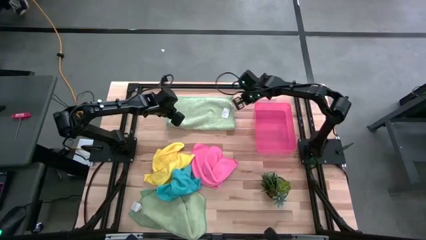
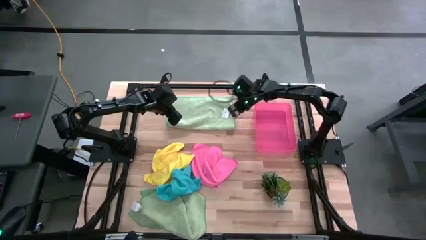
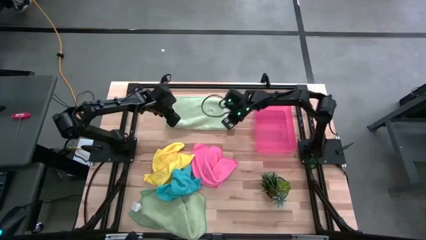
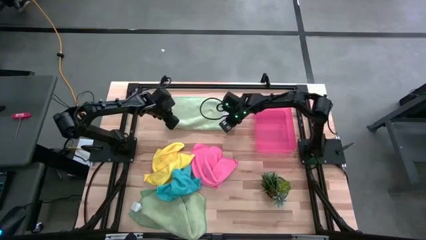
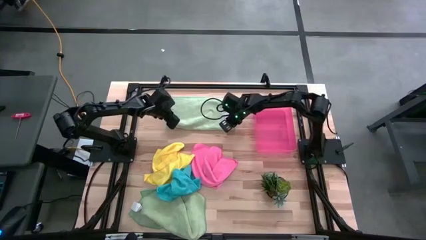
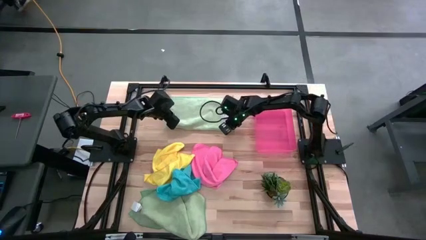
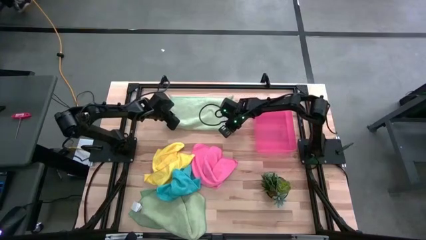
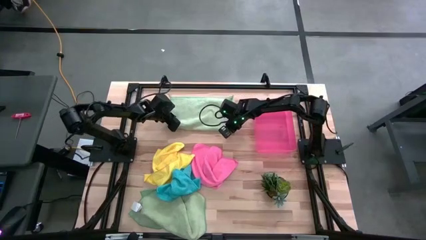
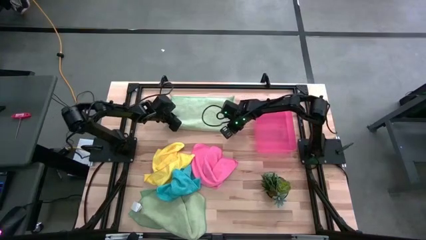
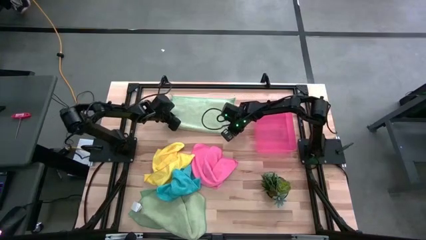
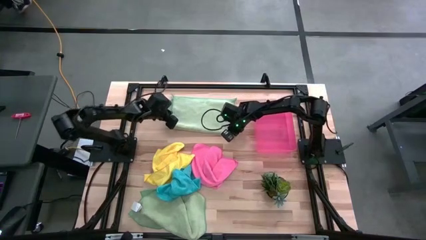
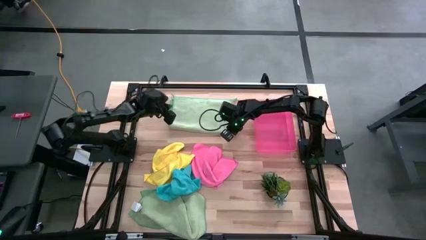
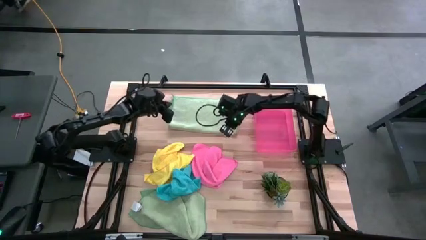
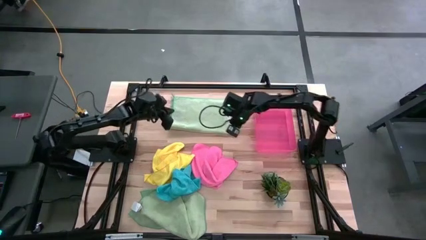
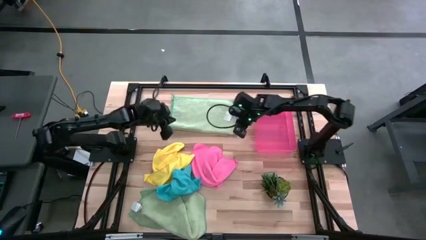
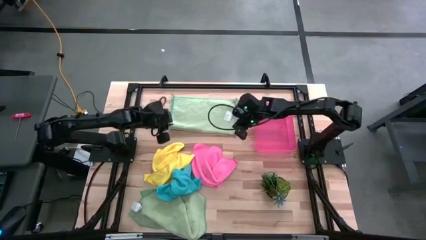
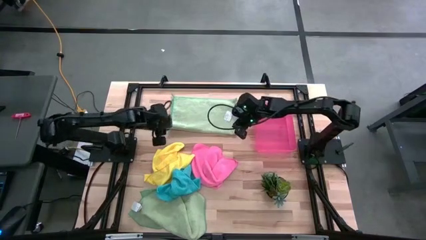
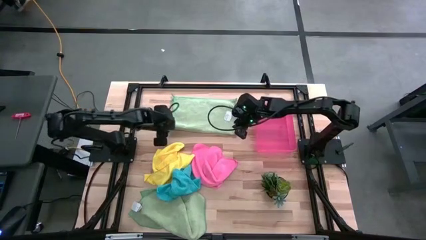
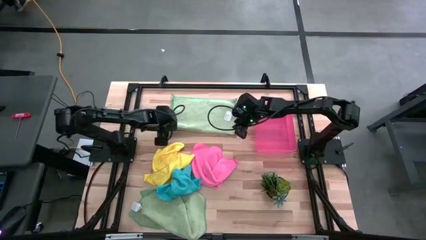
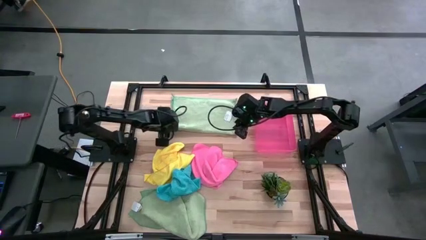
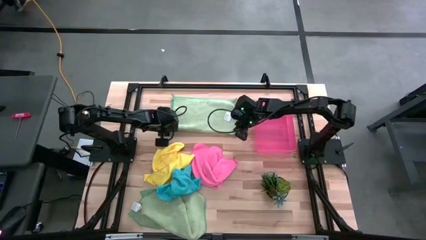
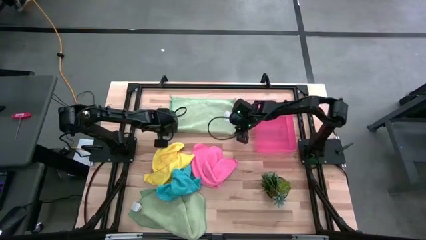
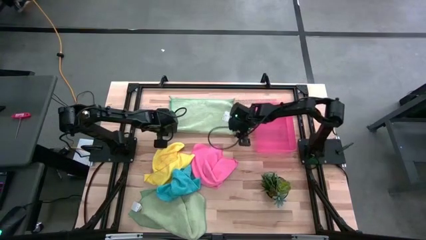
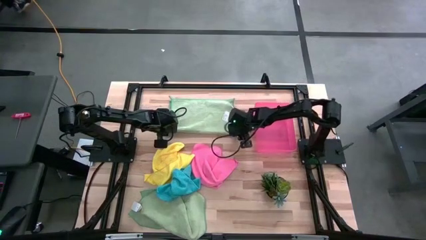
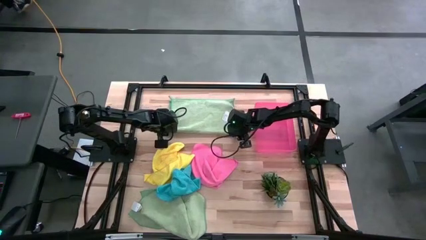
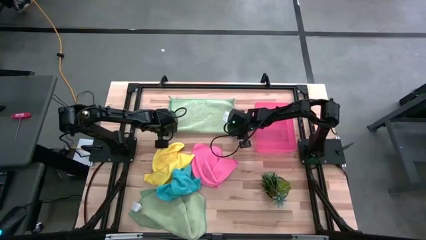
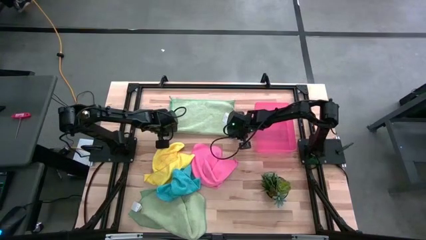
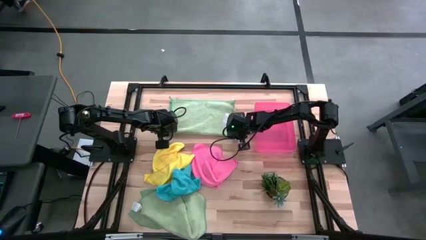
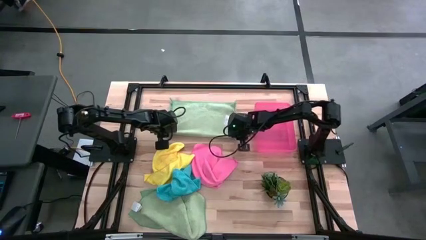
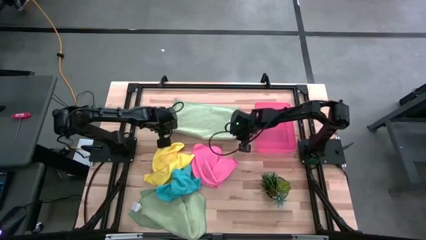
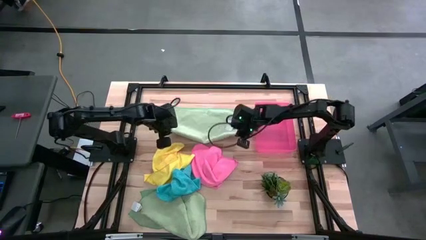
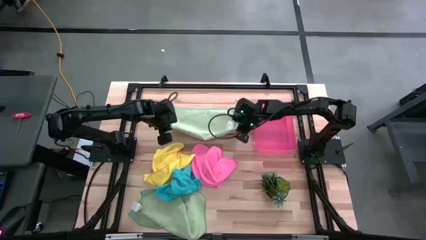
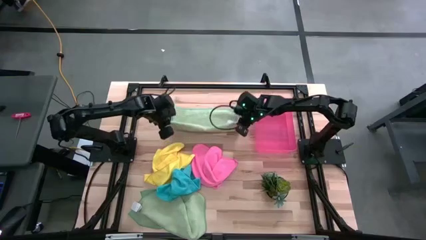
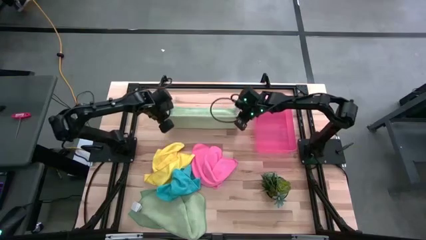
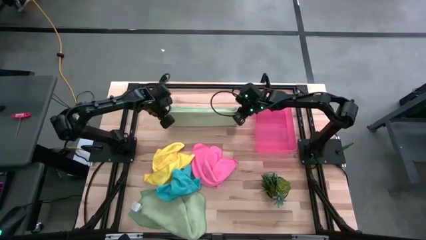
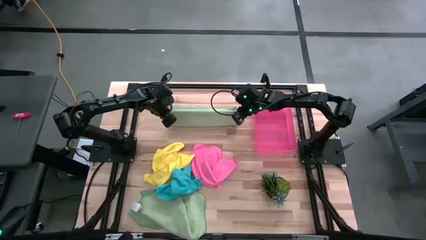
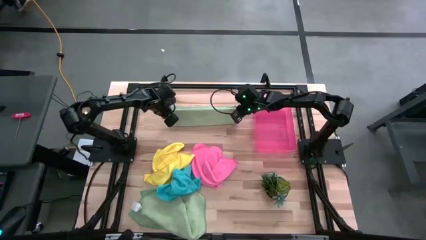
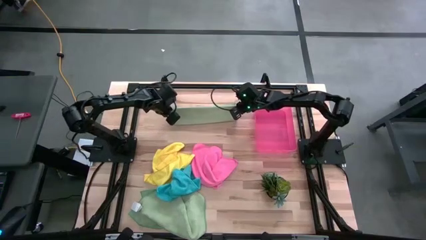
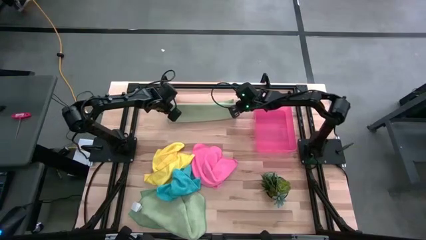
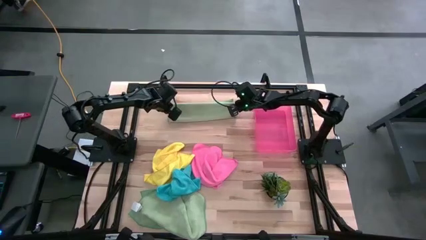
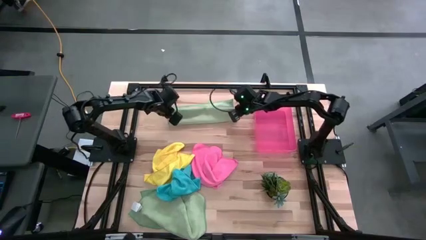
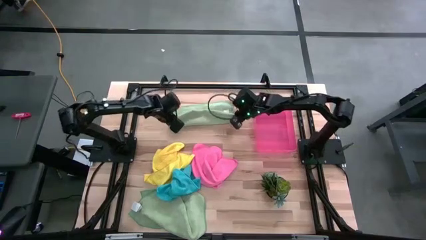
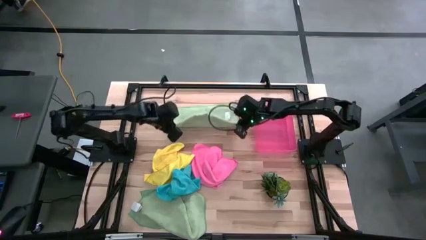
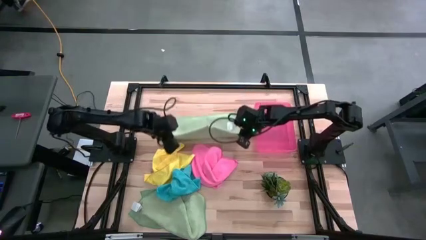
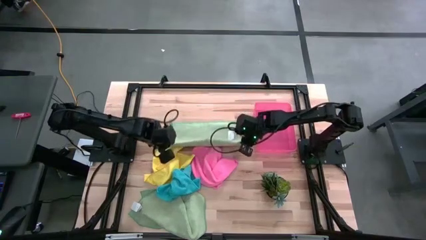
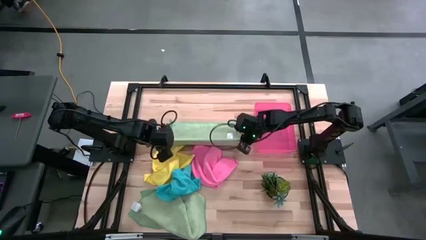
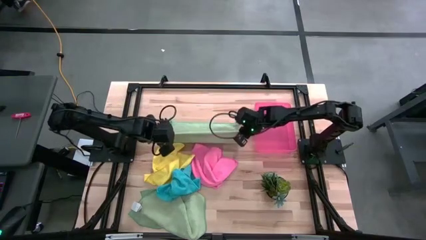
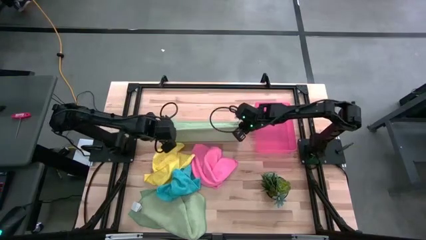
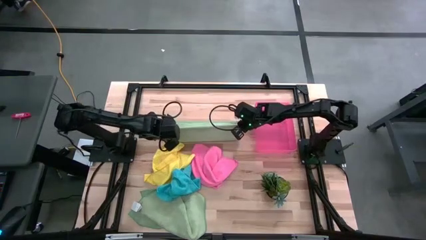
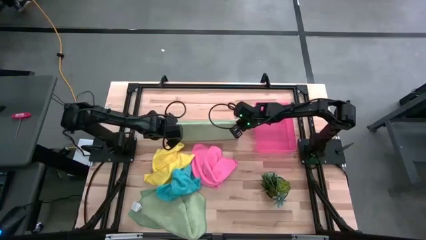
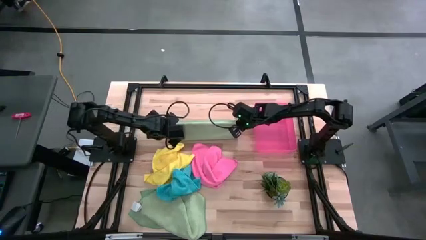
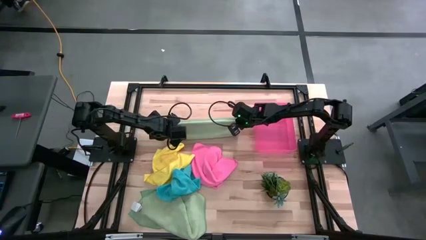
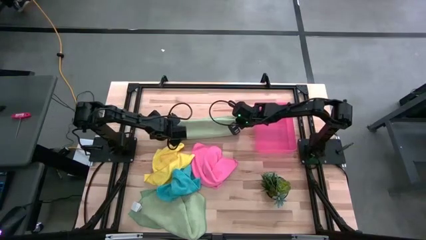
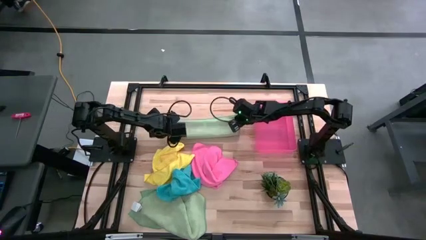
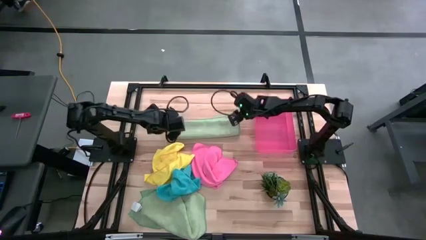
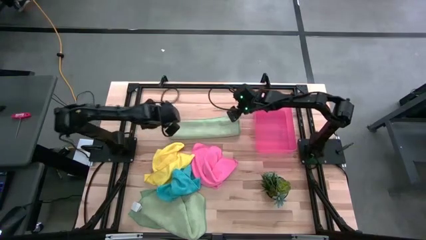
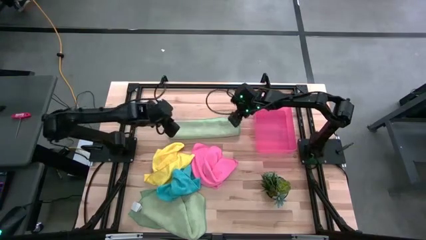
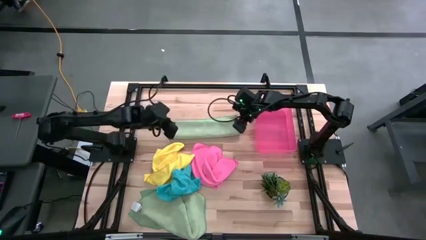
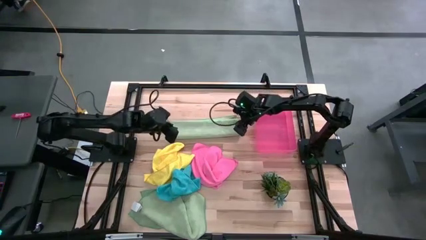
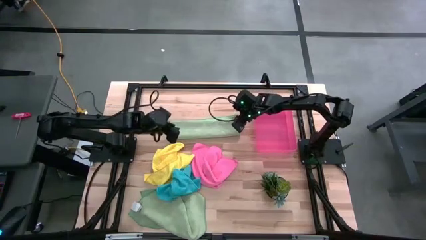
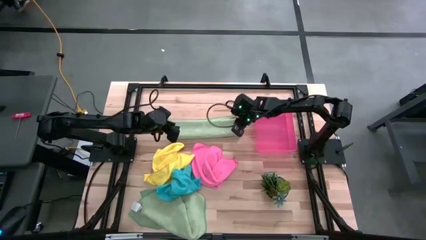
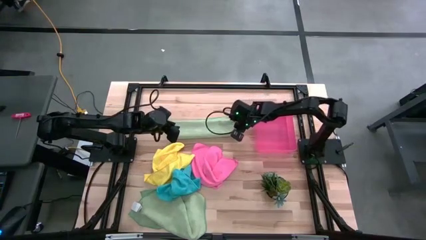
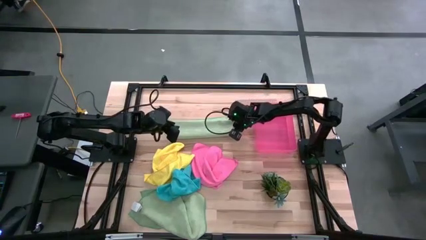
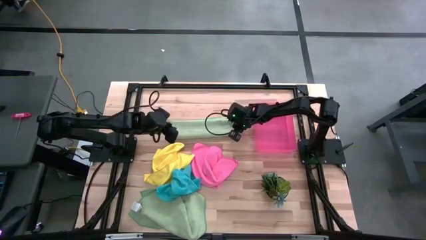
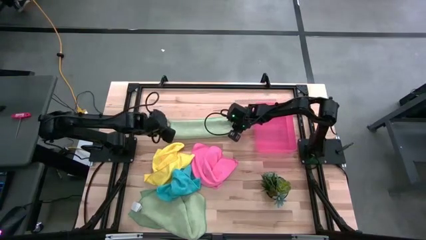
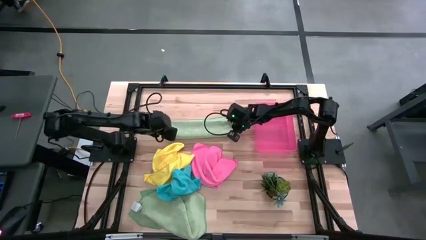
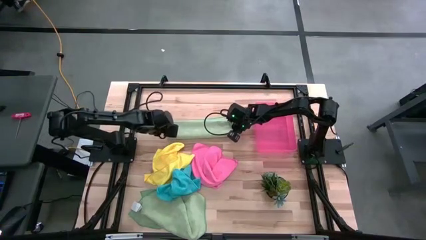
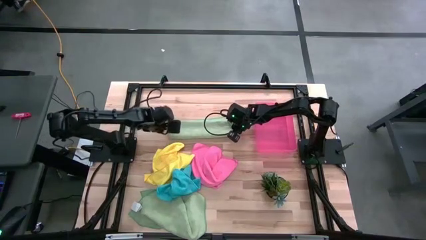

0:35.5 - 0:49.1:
Task: Fold microfiber towels
Fold the top light green microfiber cloth

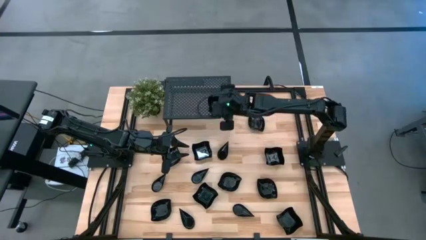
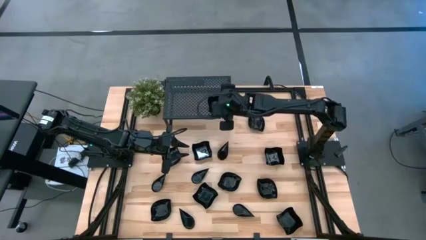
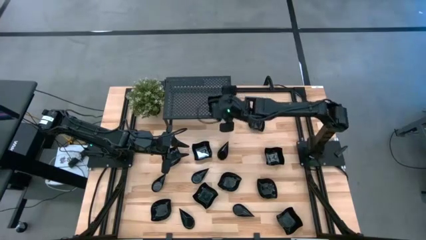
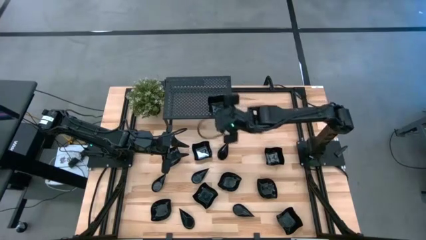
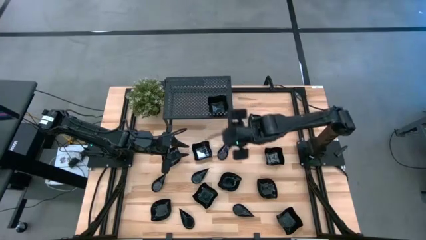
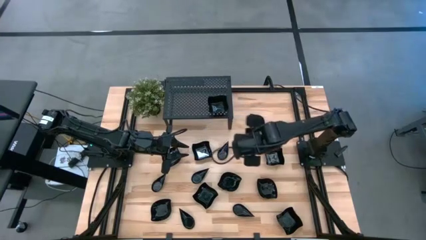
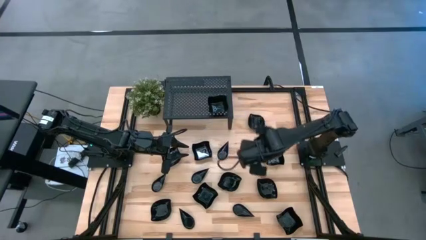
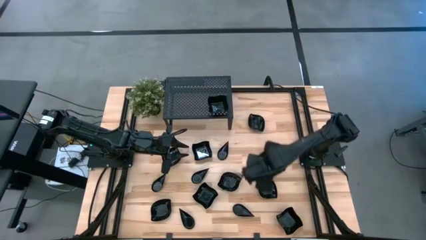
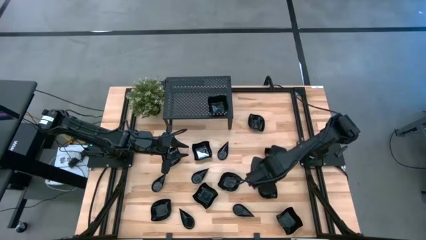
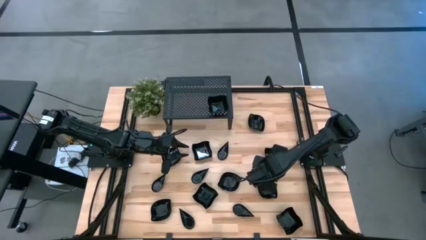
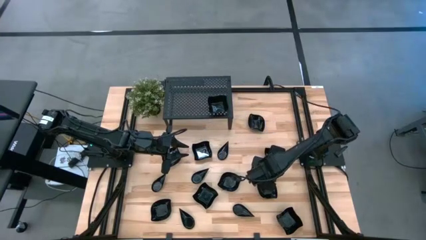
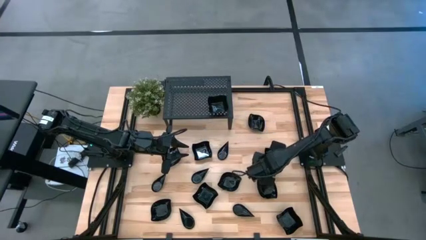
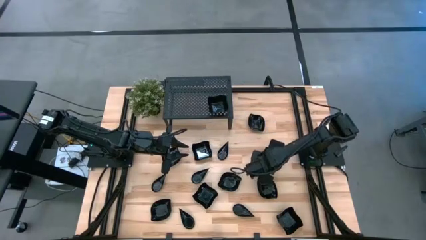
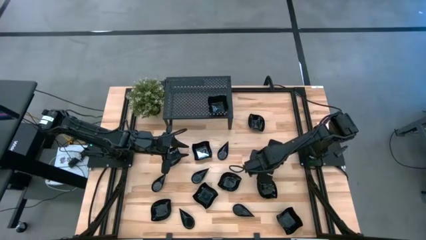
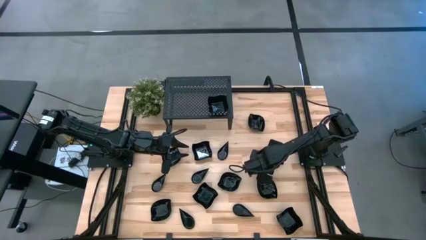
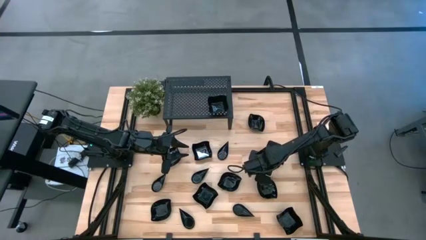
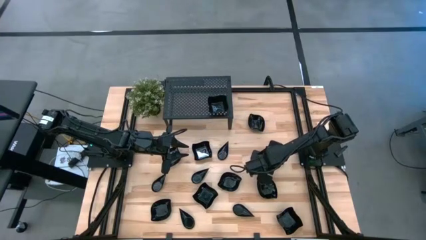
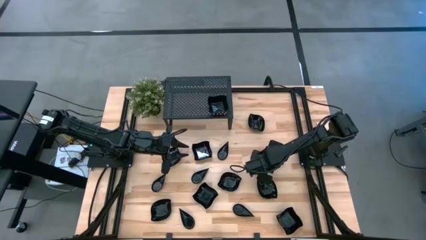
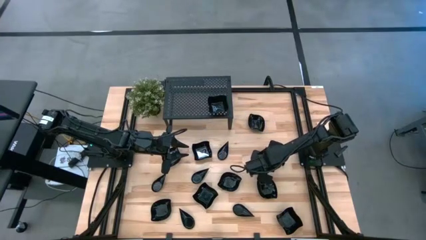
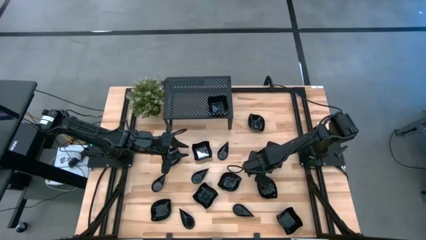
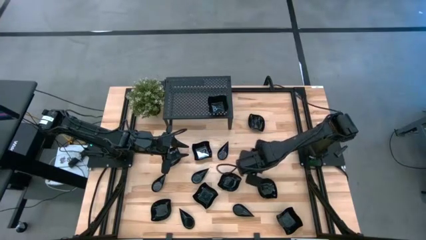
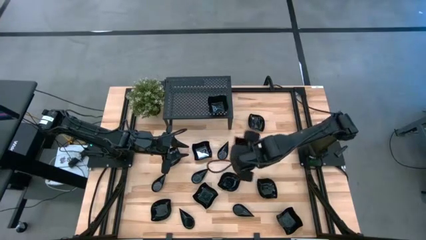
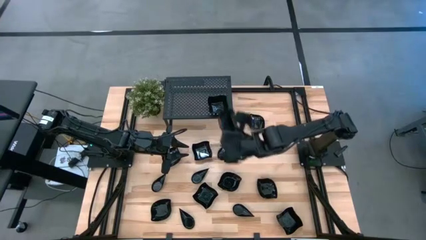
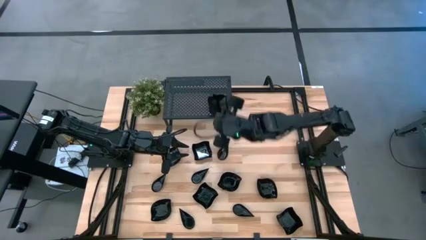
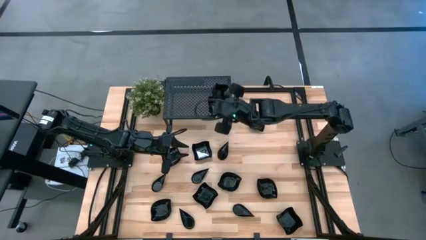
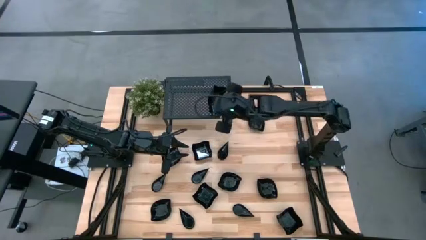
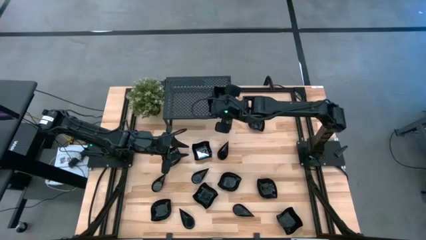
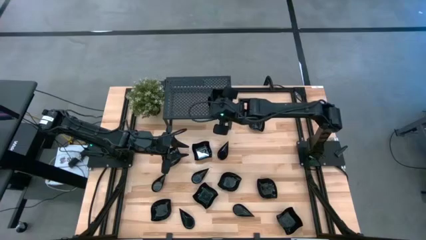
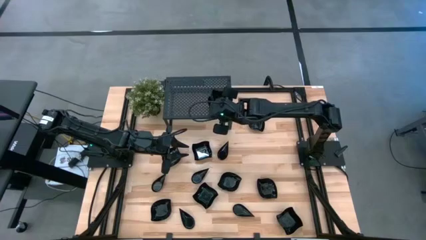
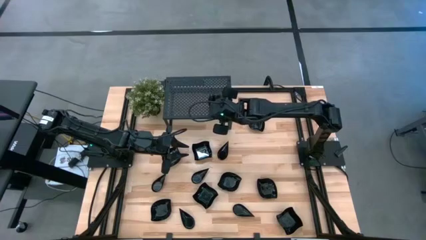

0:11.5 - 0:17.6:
Task: Pick & Place Mini shaped plates
Stack the black distorted square plate on top of the black distorted square plate on the shelf
